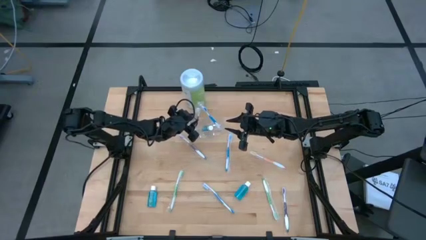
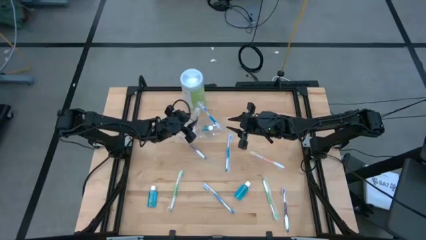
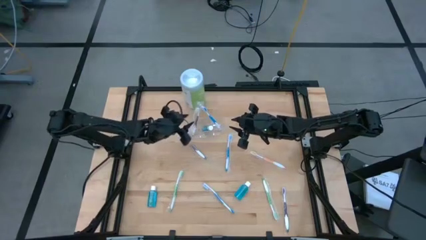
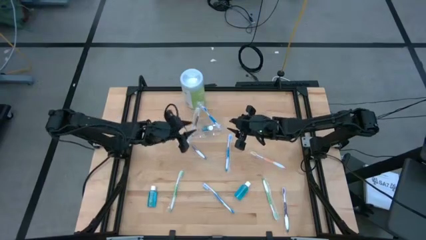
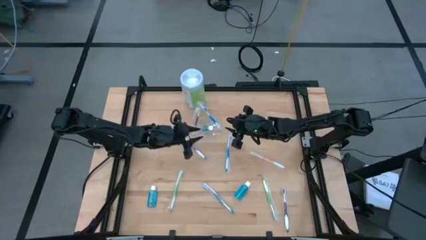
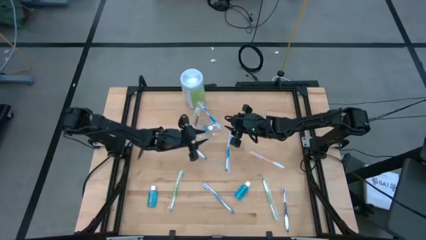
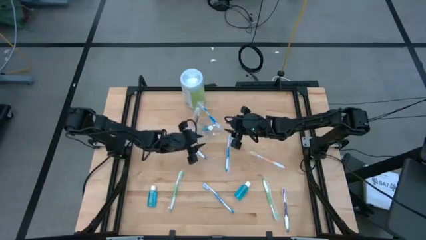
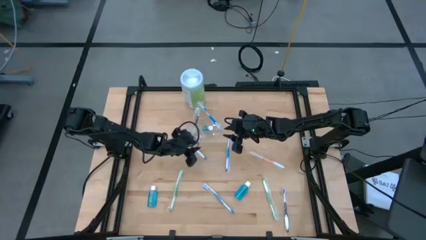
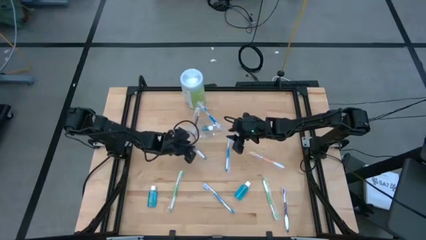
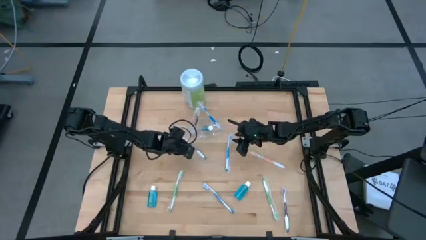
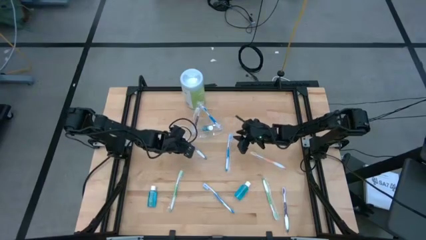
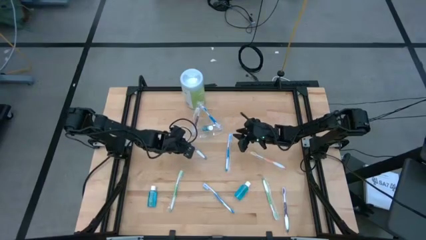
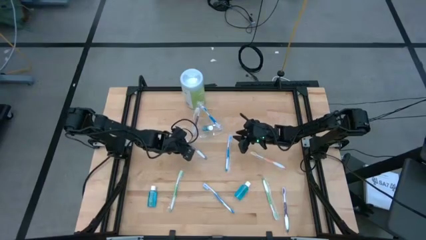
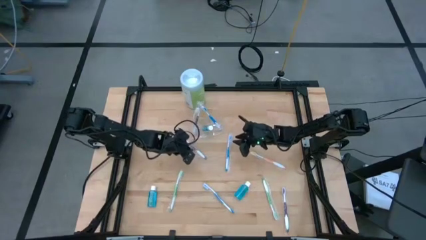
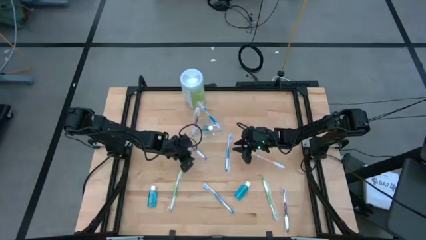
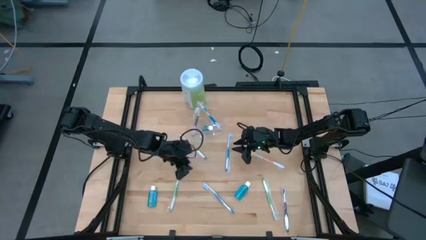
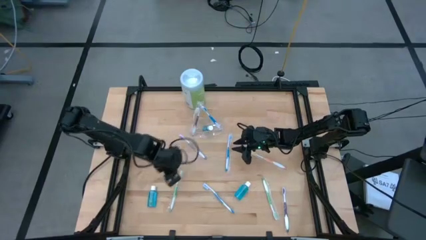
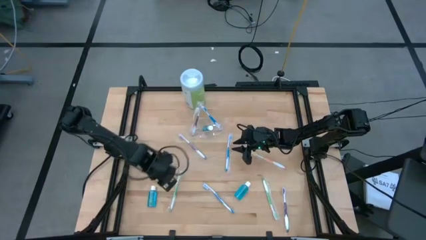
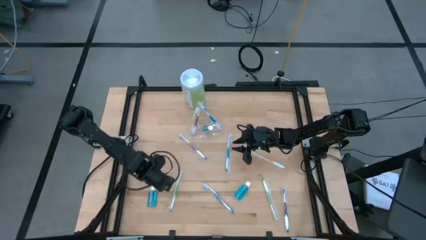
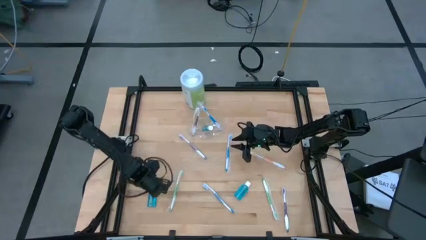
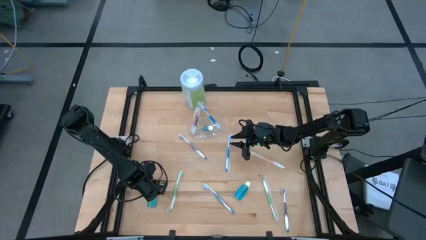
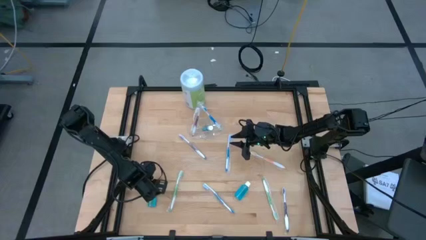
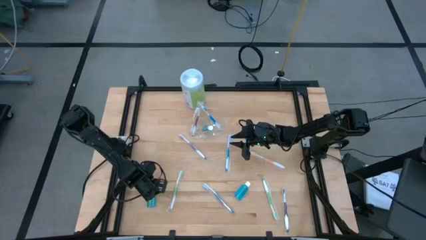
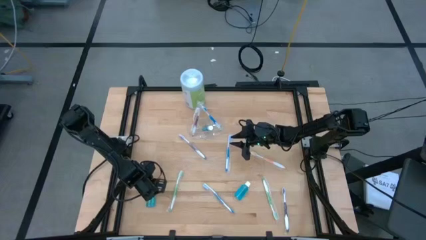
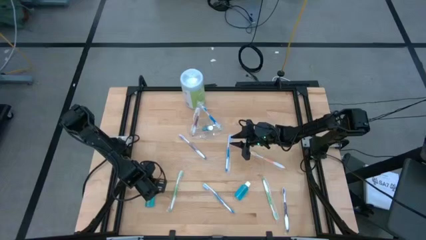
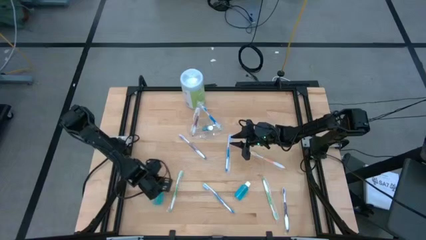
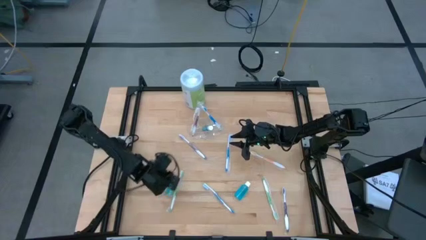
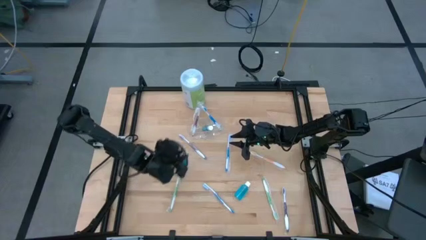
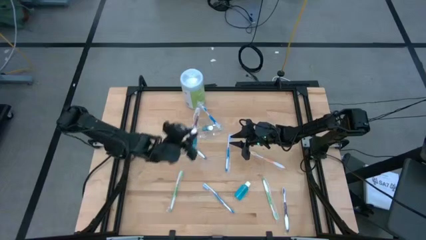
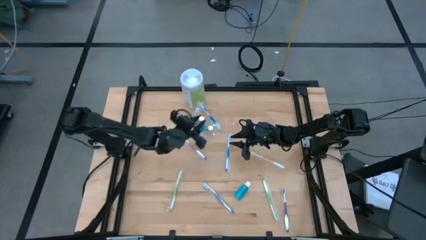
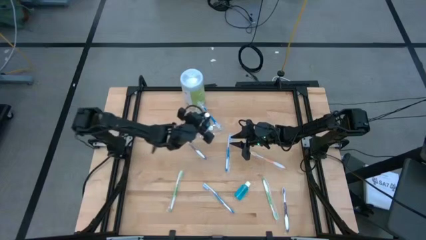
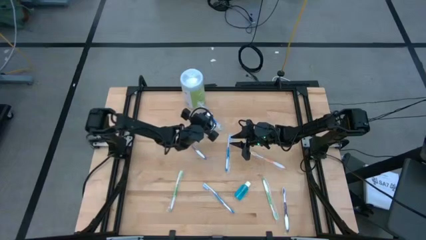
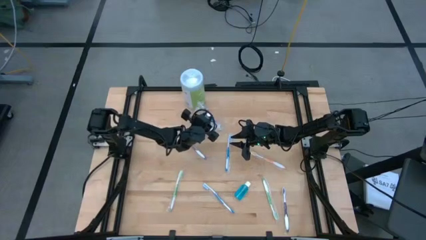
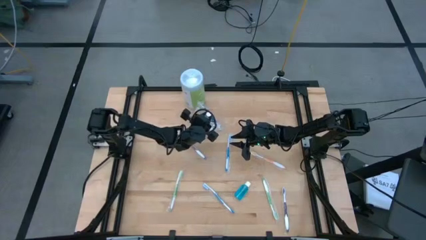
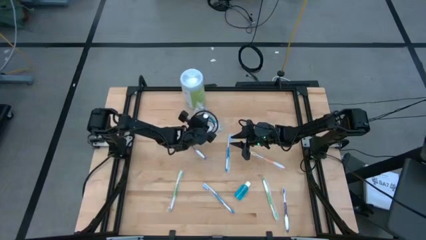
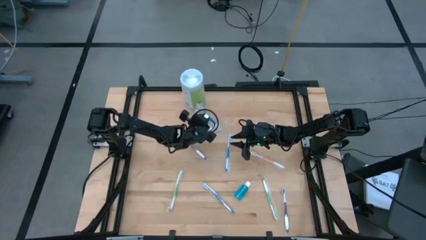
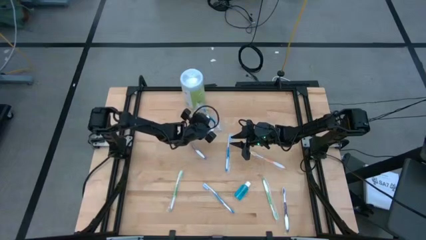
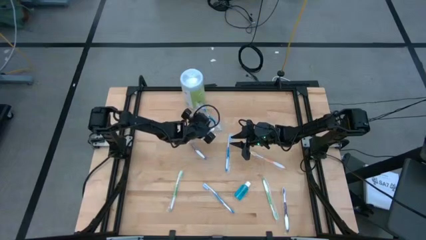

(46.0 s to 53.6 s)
Task: Pick & Place toothbrushing station
Put the left mouthwash into the center of the transparent organizer

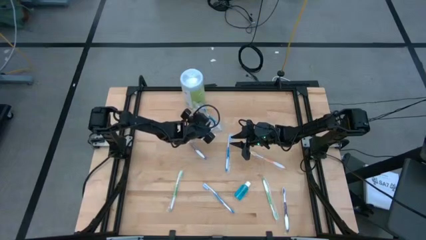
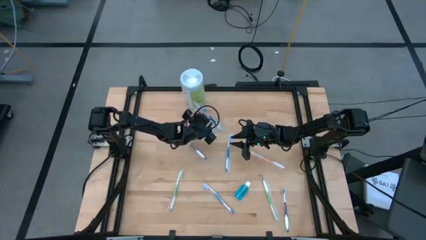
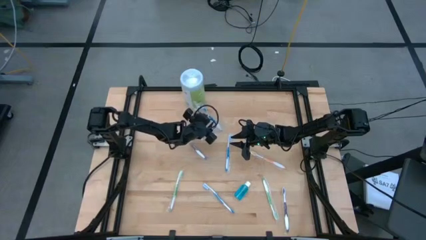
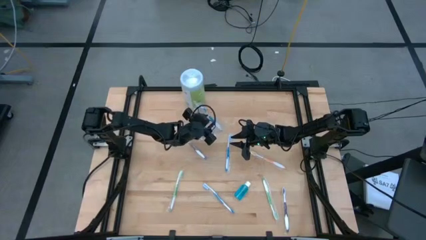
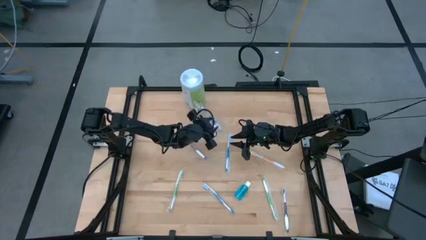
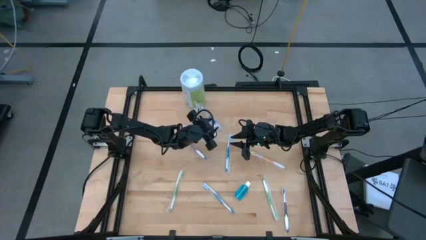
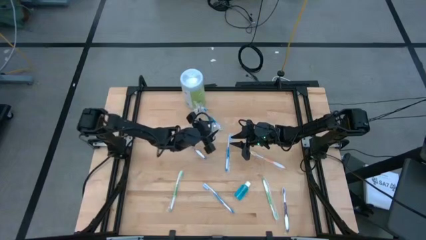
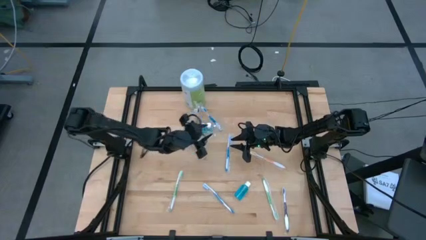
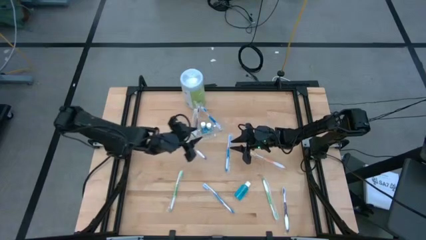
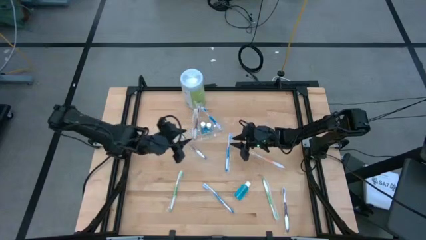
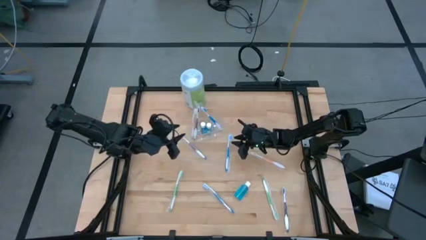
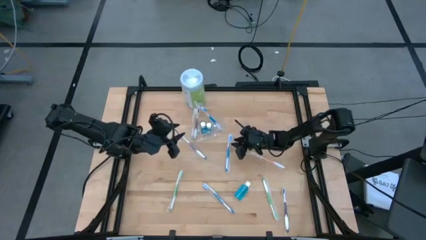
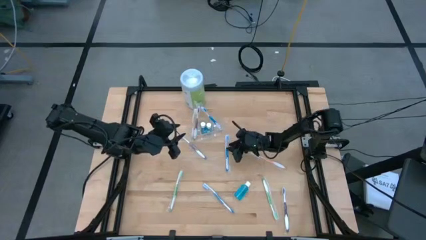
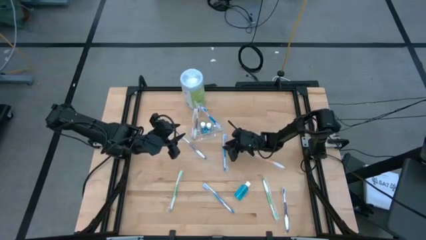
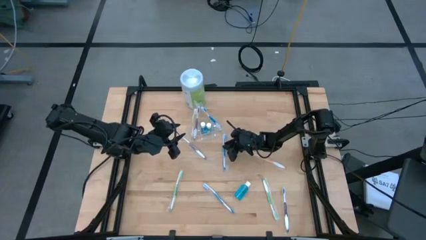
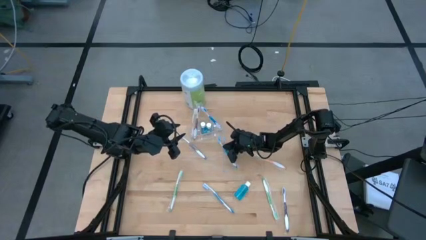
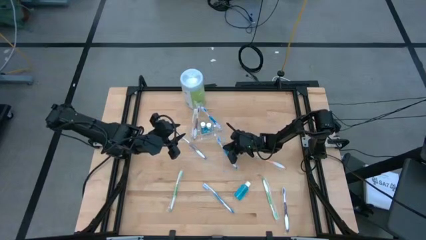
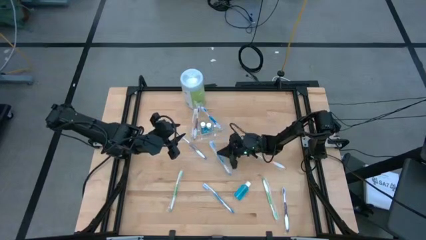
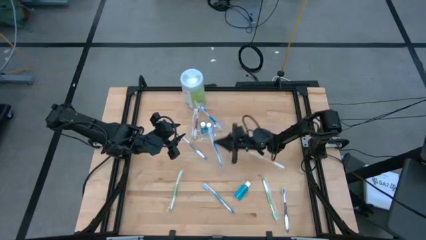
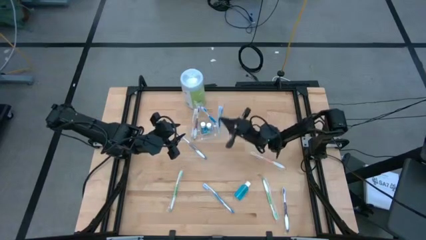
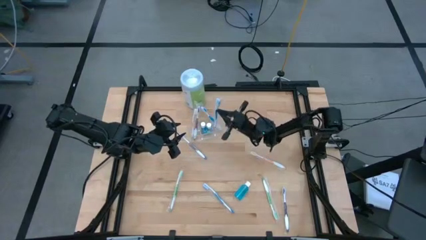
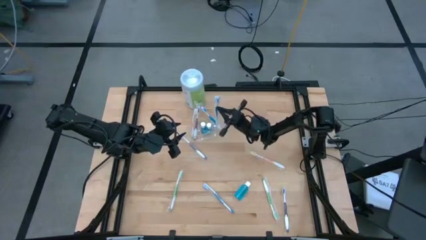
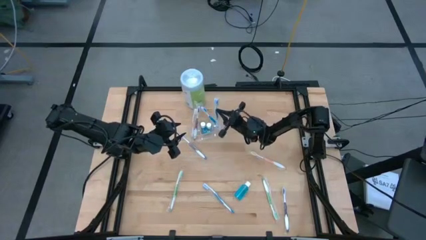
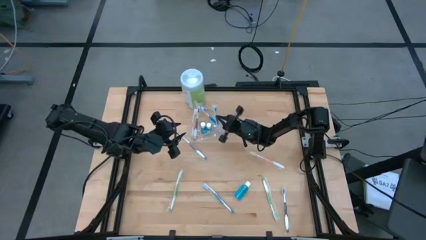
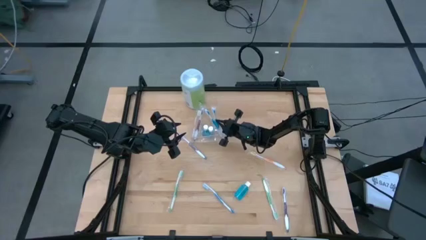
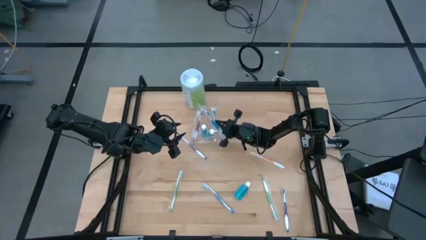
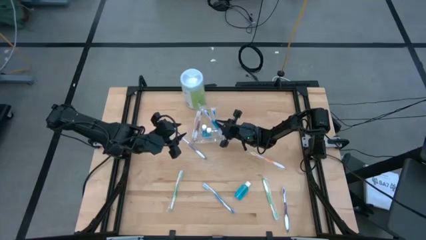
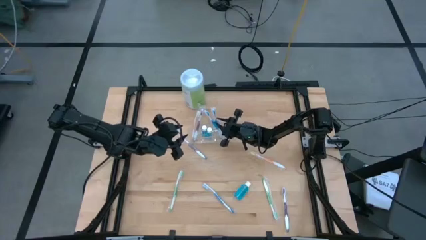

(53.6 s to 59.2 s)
Put the top blue toothbrush into the right side of the transparent organizer

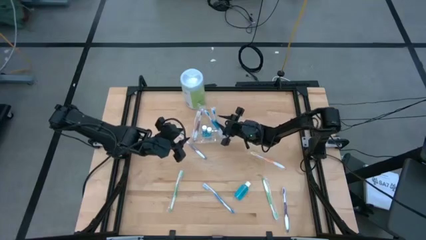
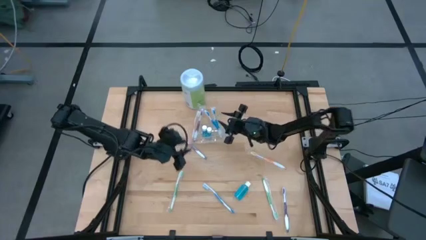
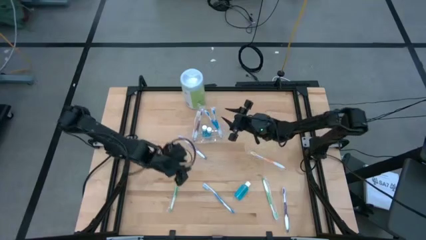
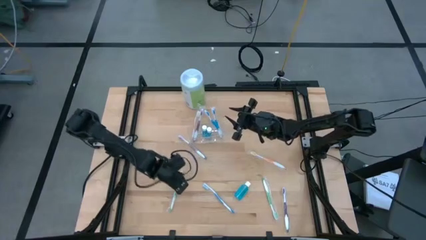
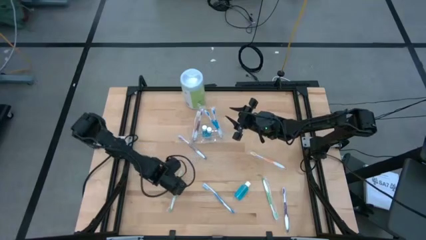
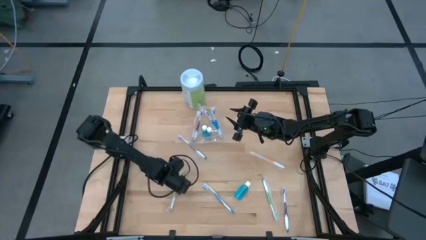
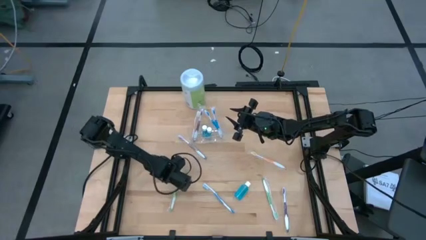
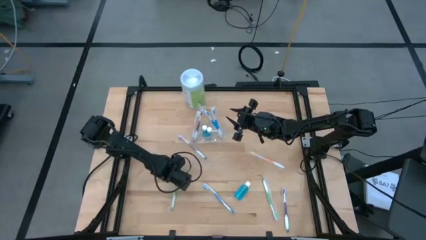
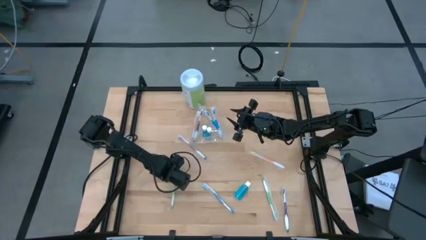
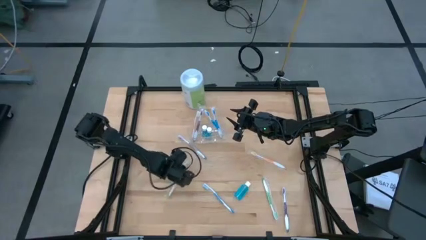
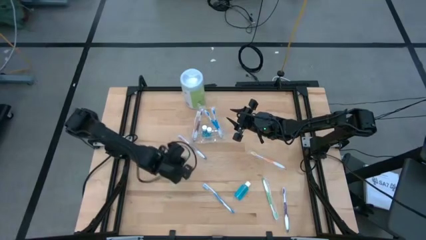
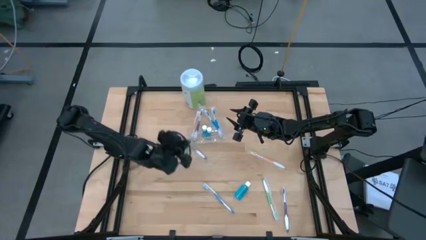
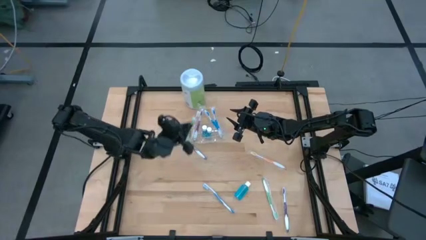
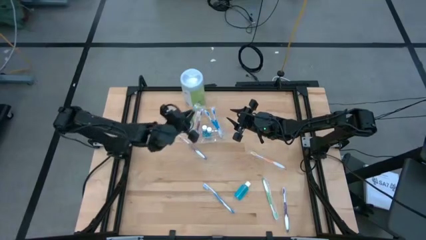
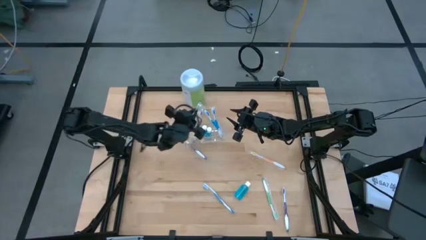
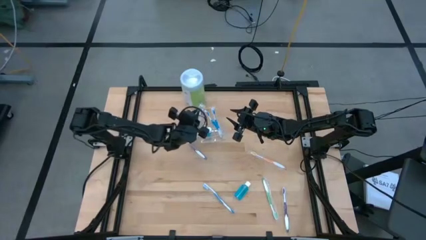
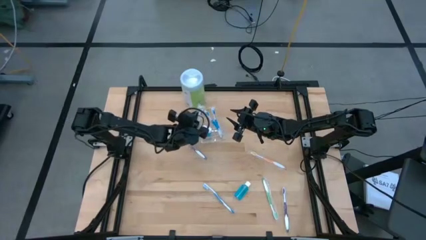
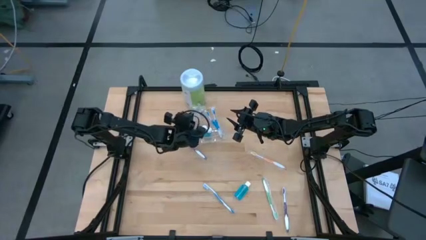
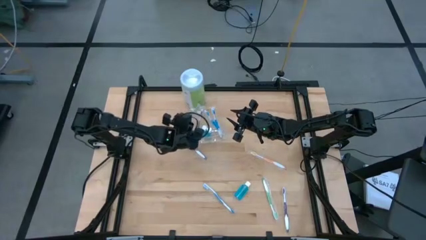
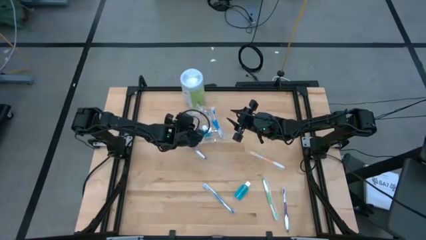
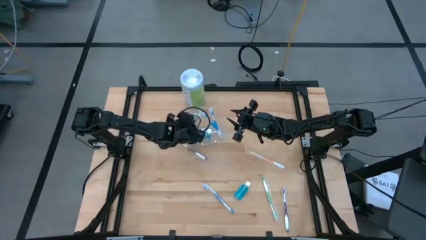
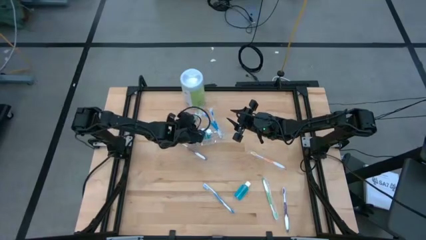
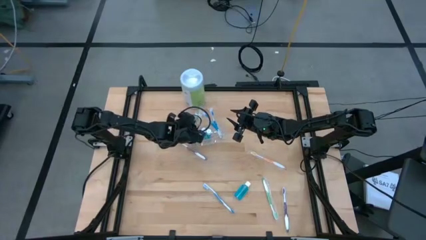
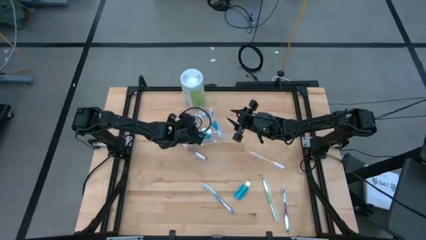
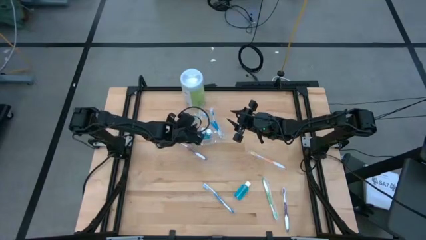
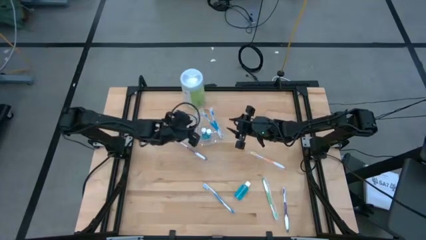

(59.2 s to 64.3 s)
Put the left green toothbrush into the left side of the transparent organizer
